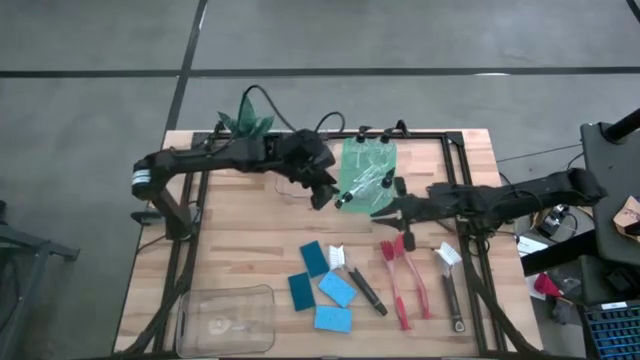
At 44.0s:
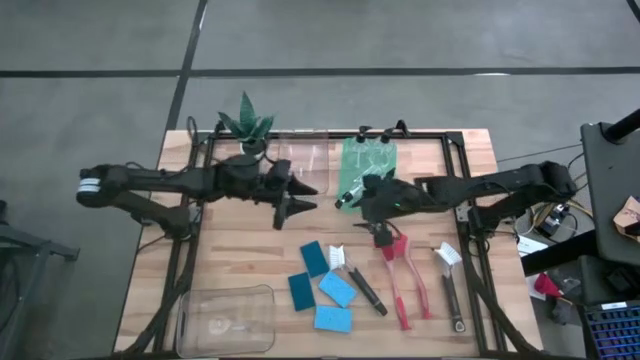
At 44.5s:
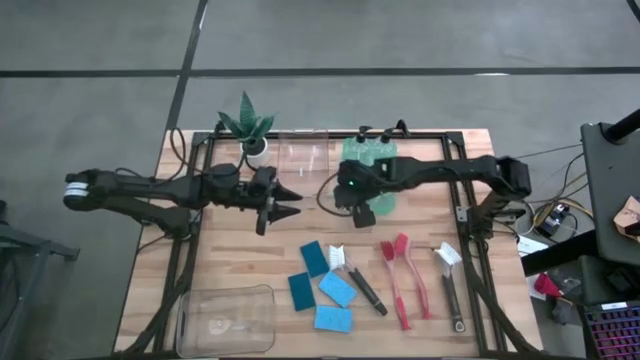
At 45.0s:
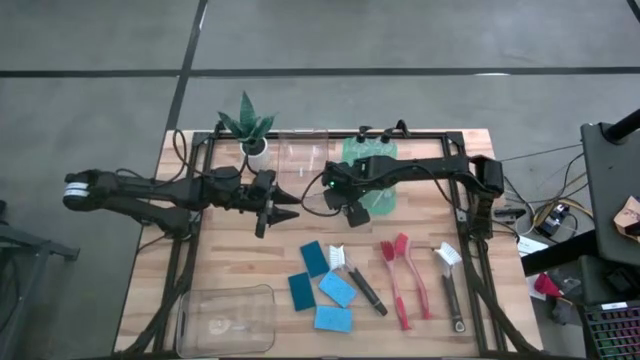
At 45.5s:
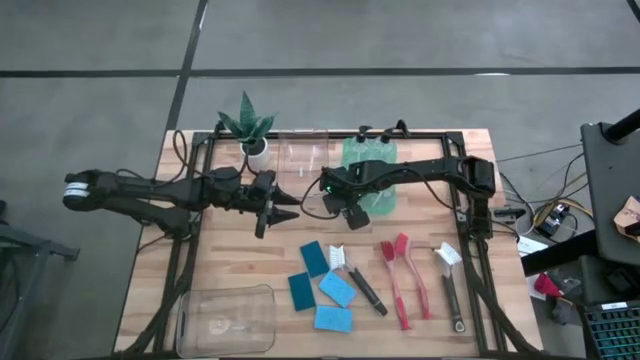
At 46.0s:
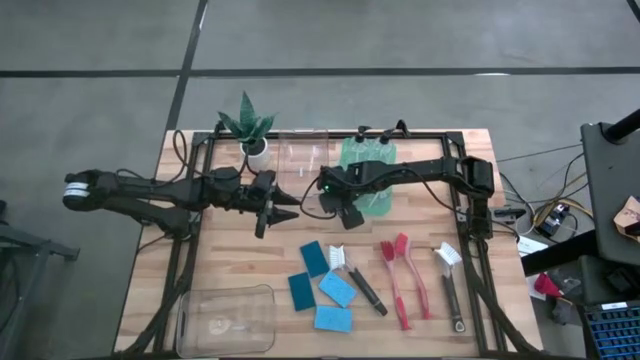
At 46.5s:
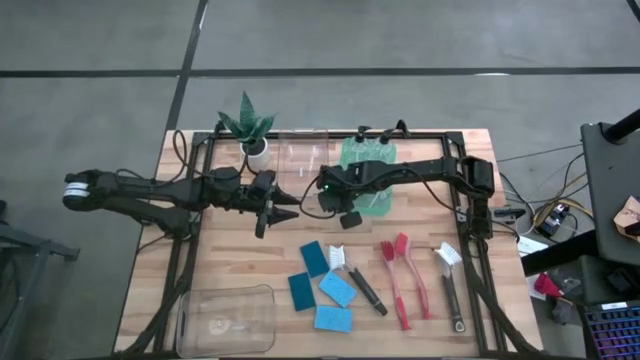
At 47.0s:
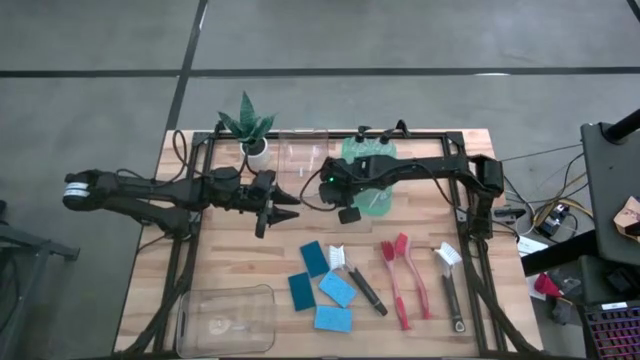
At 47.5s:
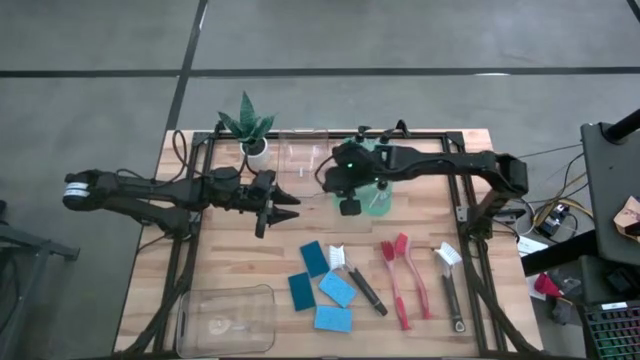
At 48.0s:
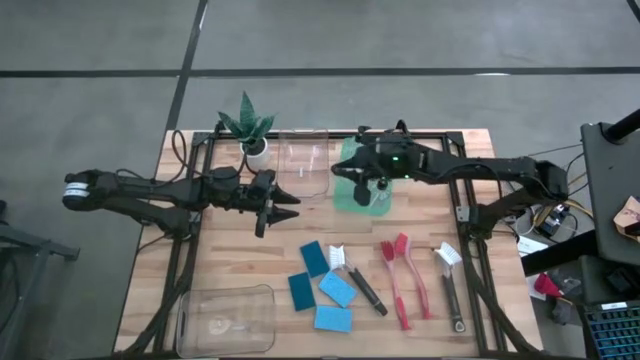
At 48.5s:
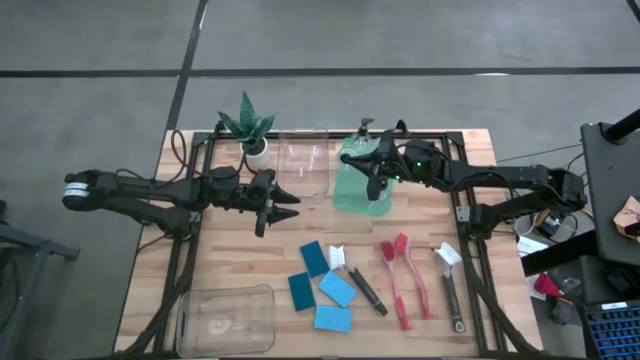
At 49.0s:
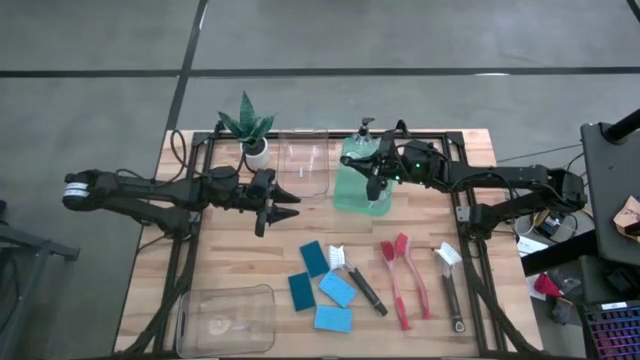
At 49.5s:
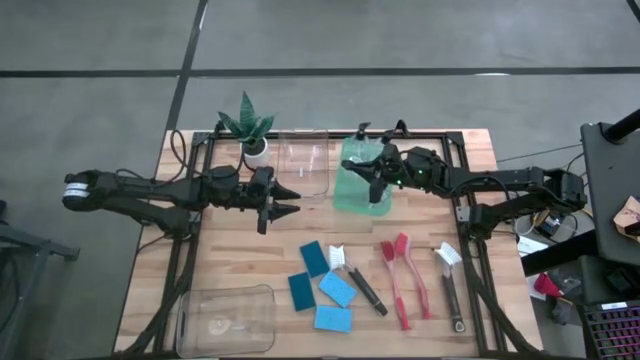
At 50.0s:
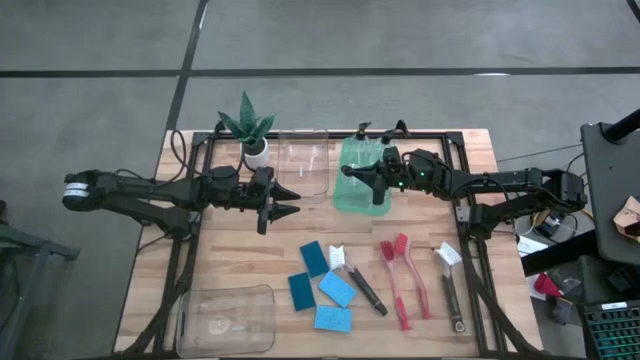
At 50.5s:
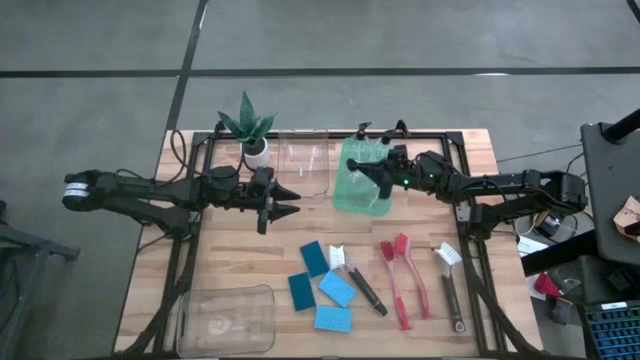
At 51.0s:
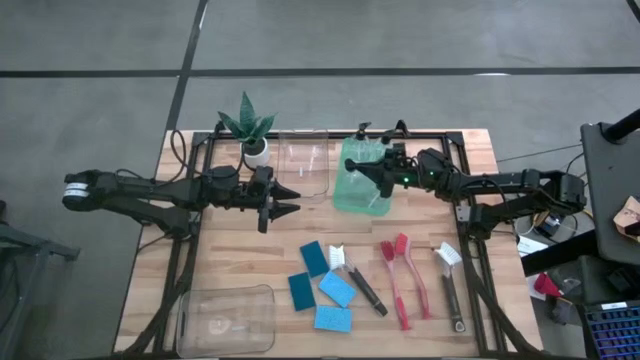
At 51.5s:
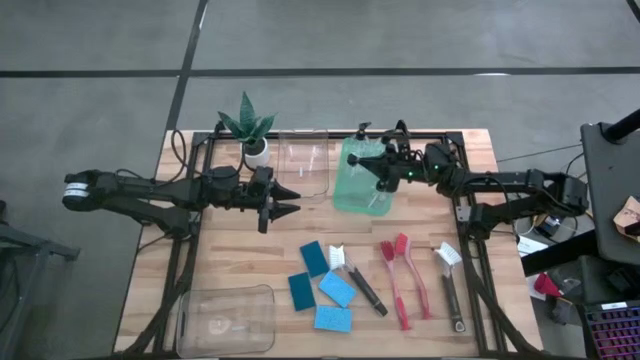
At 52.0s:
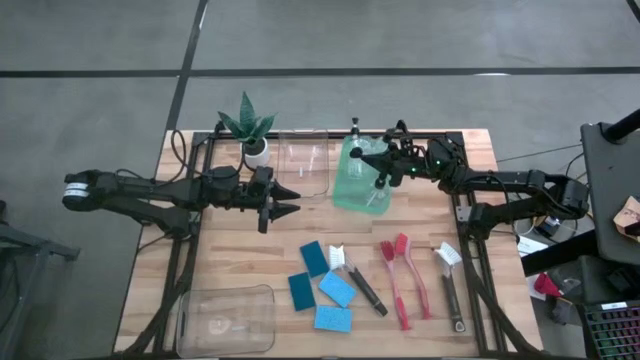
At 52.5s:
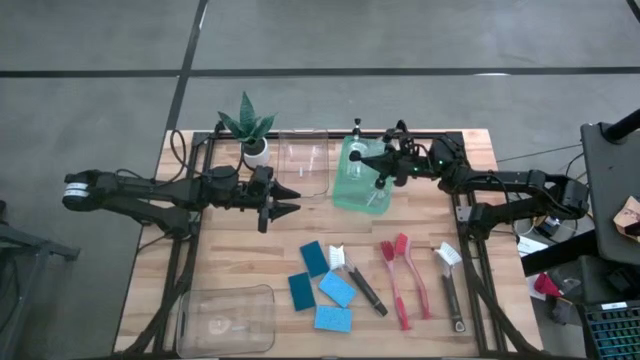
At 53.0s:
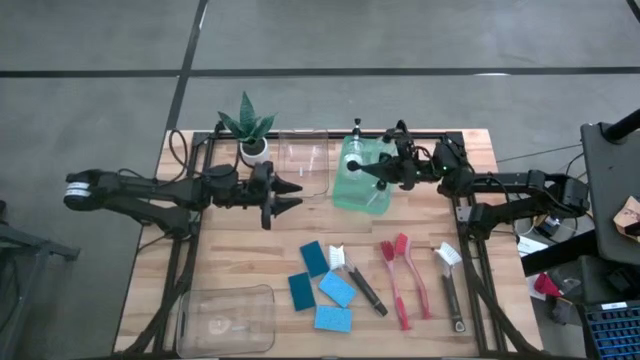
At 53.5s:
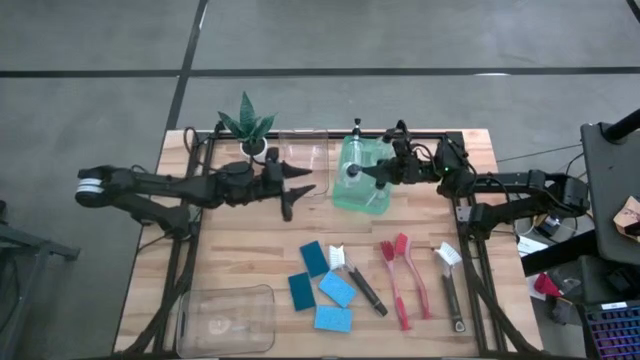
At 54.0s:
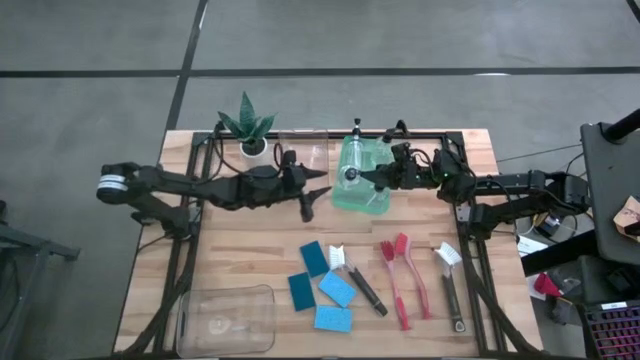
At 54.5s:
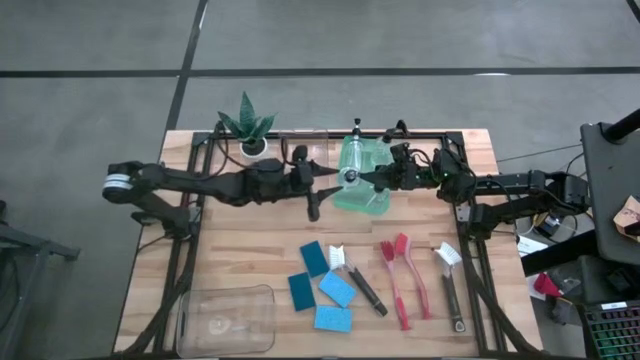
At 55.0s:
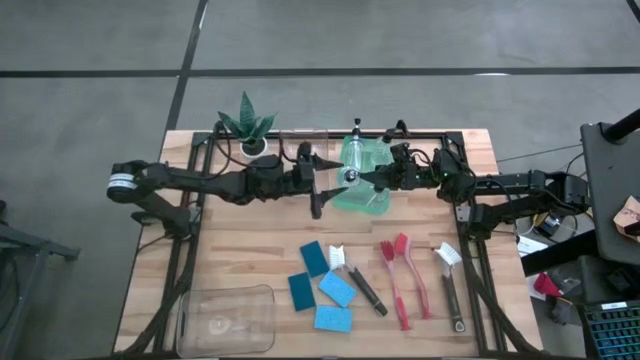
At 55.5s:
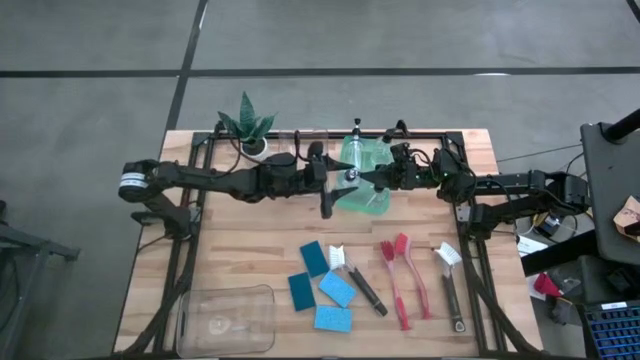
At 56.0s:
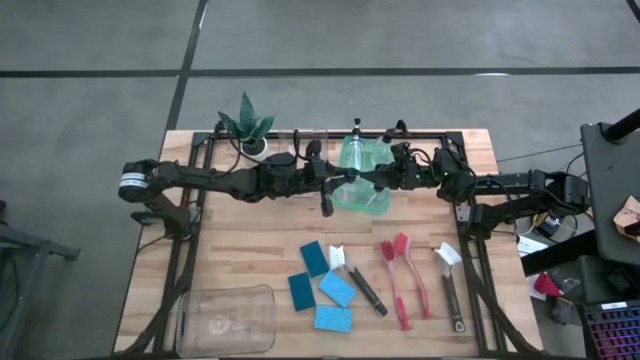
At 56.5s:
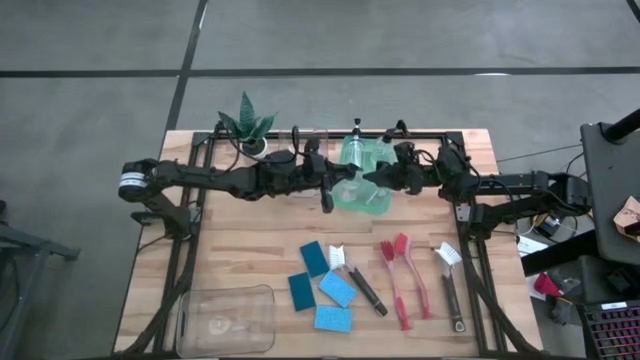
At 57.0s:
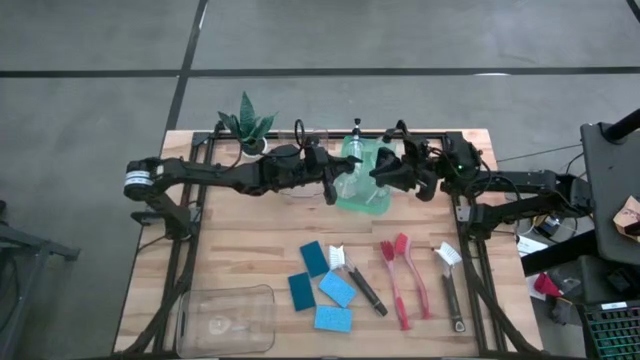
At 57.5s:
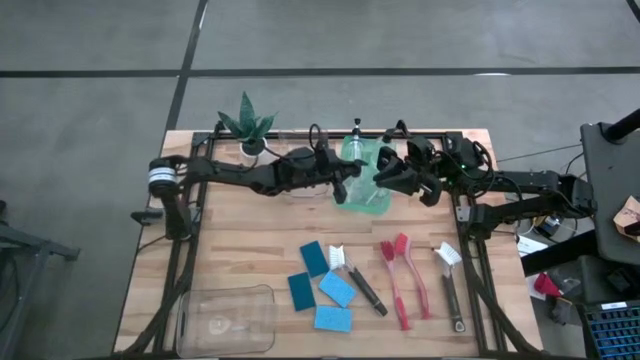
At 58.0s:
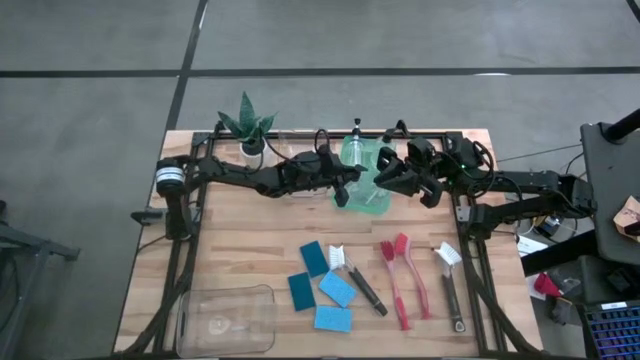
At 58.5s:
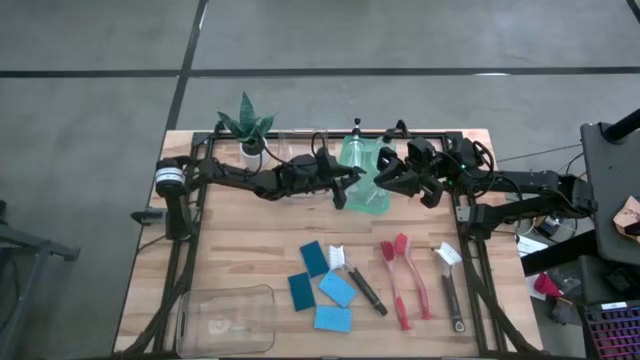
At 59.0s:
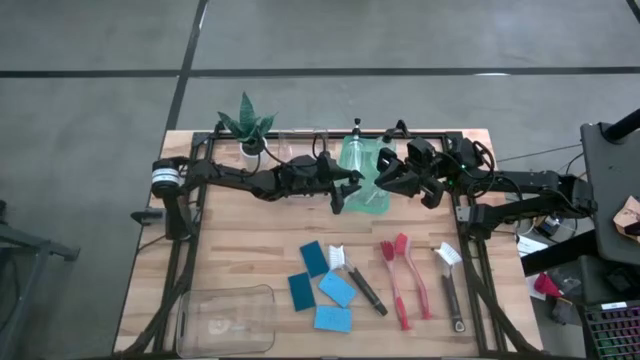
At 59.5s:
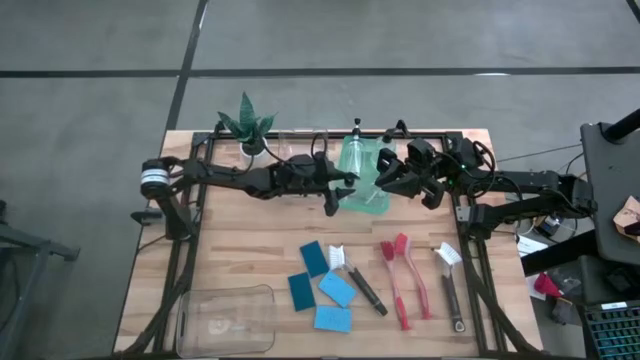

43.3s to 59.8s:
Task: Pick & Place Kitchen Sink Supplies
Put the transparent soap dispenser into the green bin

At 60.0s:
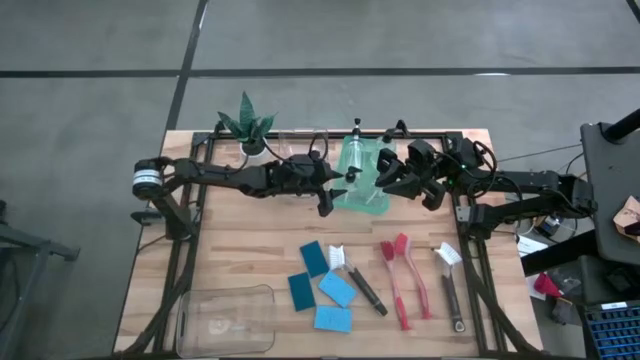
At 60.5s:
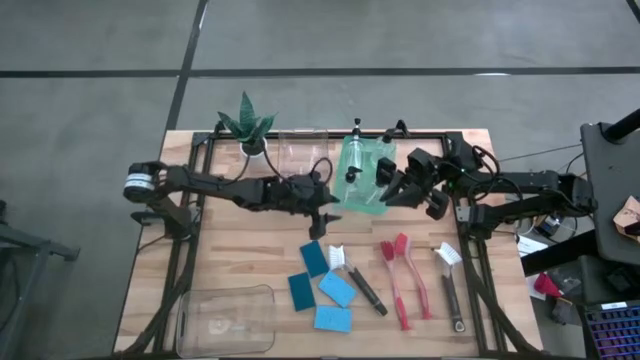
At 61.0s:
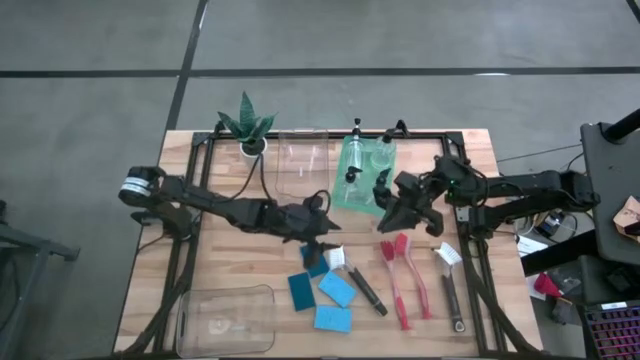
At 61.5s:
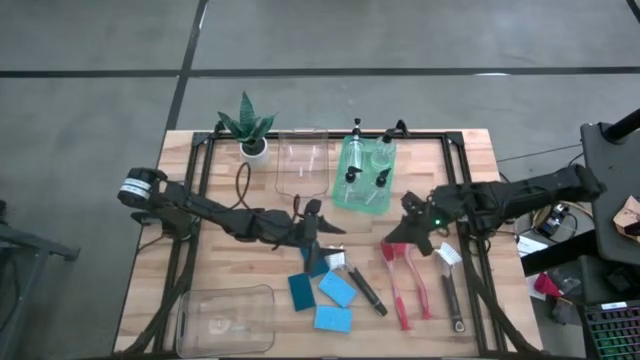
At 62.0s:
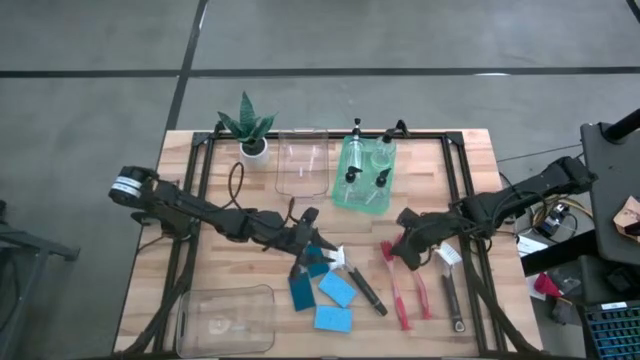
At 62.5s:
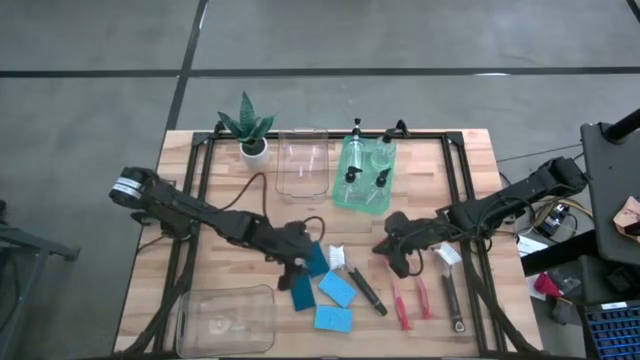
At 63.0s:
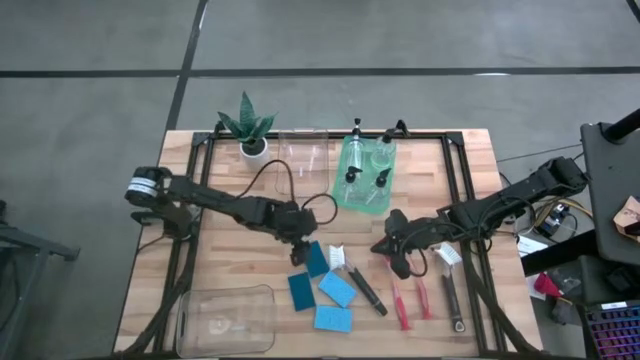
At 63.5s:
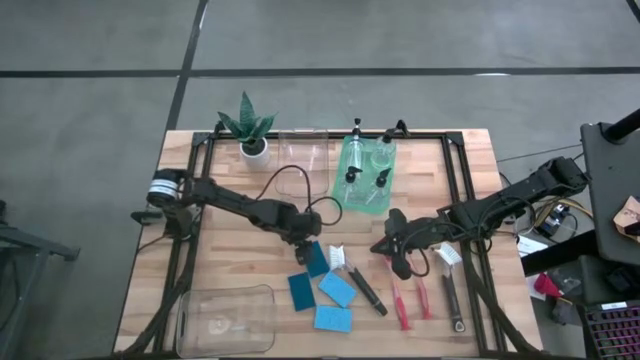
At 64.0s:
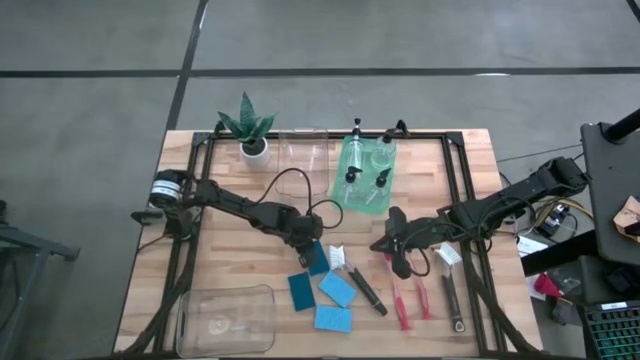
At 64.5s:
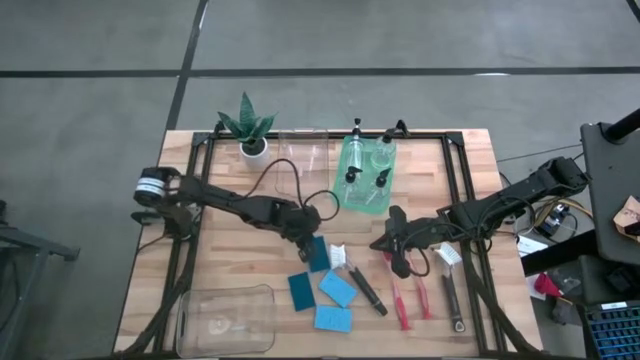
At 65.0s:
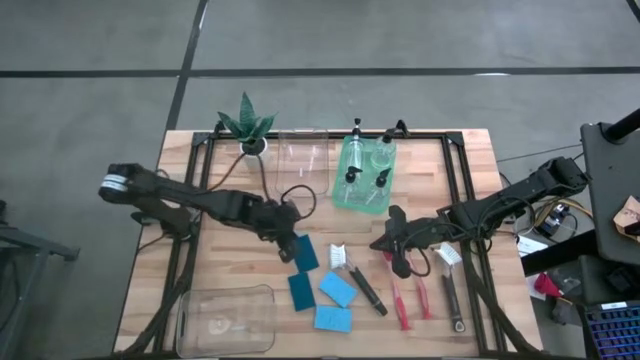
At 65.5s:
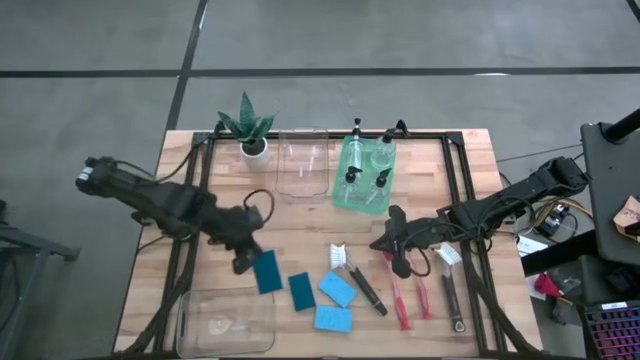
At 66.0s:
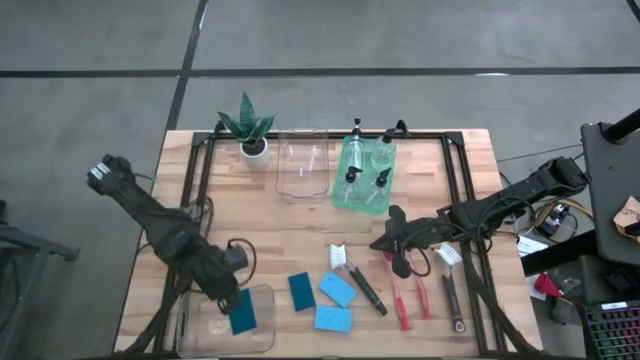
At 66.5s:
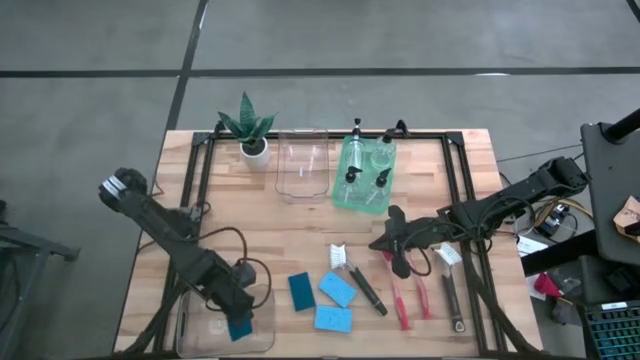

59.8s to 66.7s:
Put the blue sponge into the bottom transparent bin
